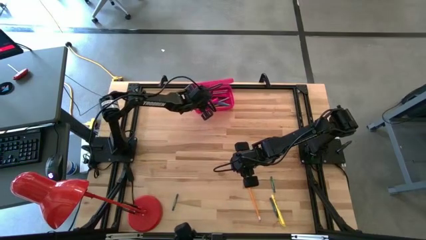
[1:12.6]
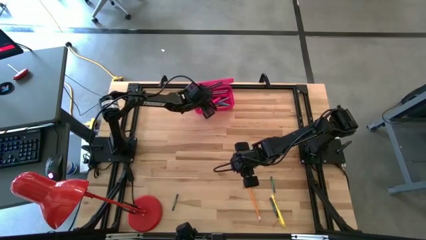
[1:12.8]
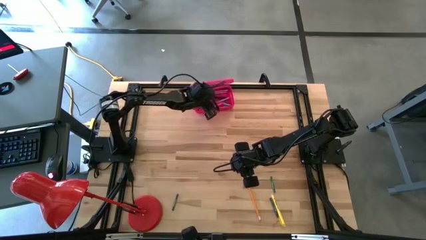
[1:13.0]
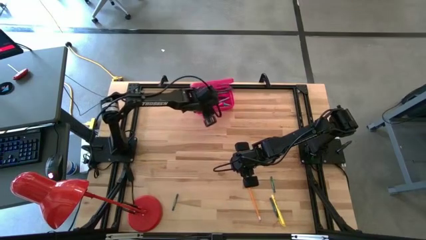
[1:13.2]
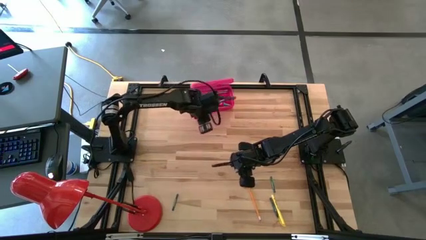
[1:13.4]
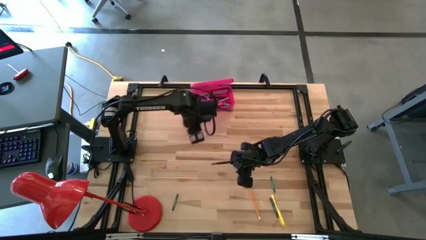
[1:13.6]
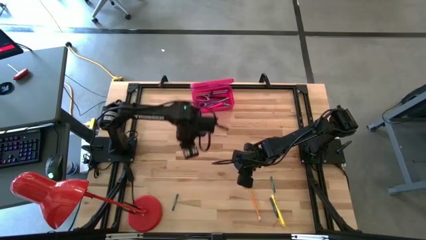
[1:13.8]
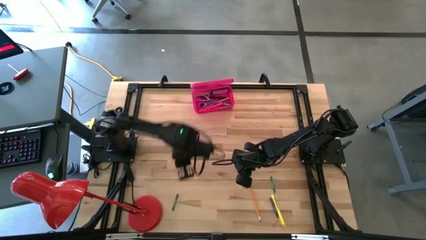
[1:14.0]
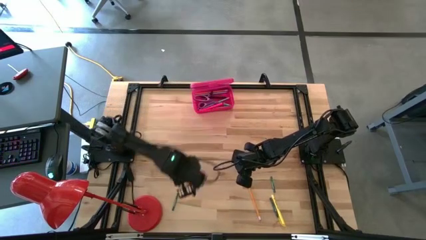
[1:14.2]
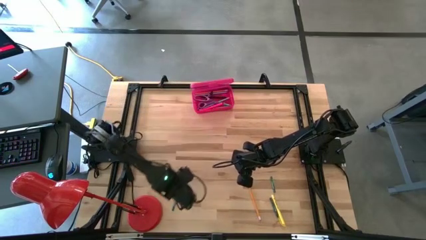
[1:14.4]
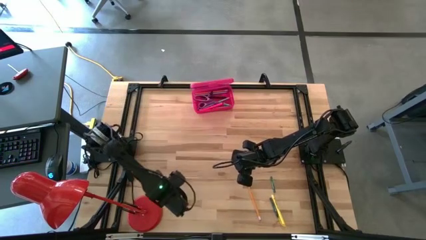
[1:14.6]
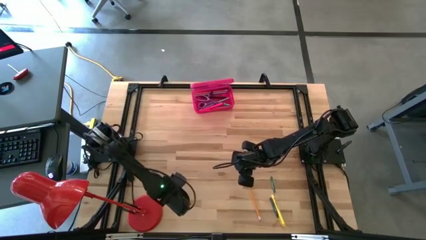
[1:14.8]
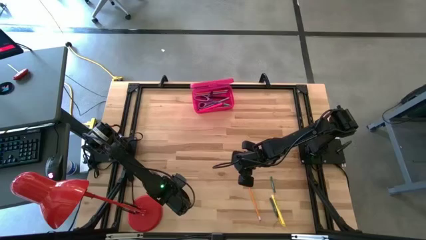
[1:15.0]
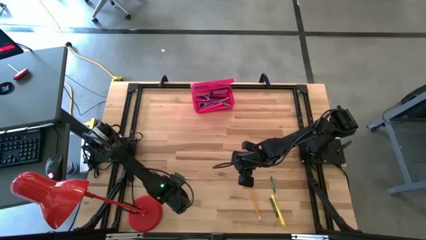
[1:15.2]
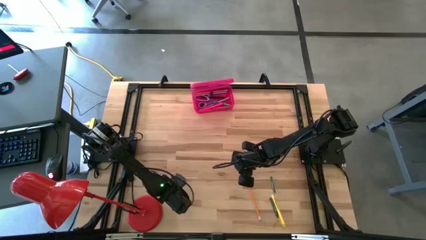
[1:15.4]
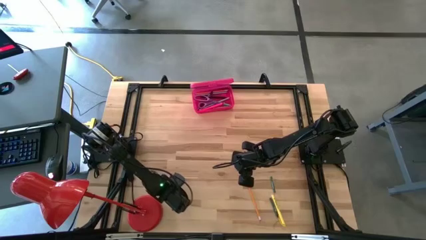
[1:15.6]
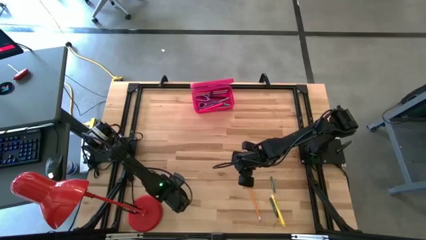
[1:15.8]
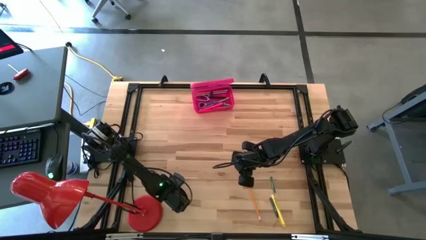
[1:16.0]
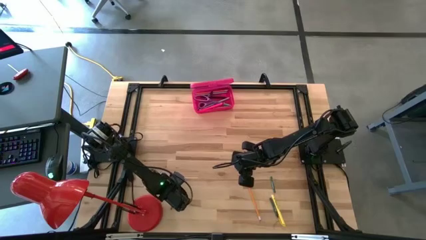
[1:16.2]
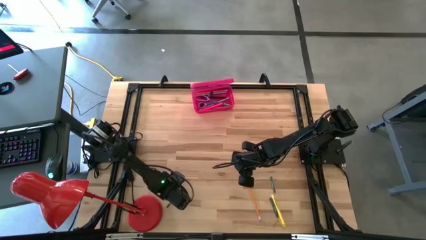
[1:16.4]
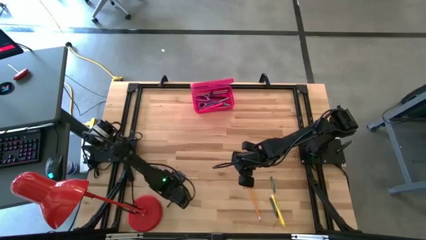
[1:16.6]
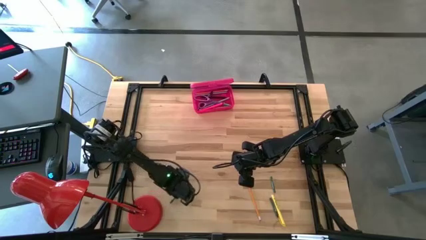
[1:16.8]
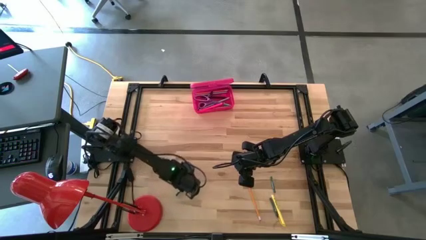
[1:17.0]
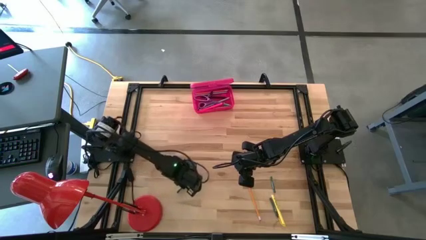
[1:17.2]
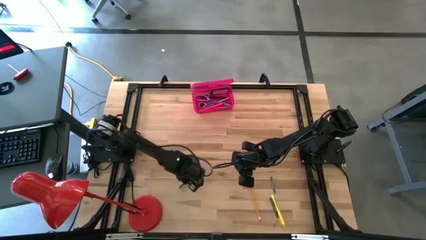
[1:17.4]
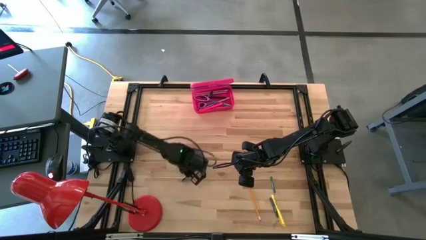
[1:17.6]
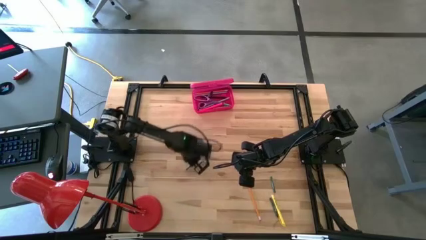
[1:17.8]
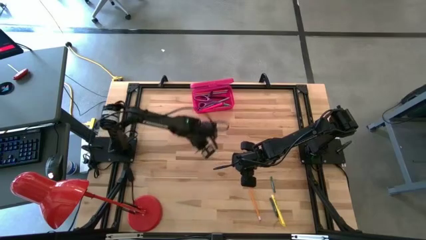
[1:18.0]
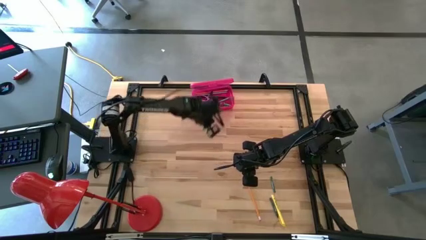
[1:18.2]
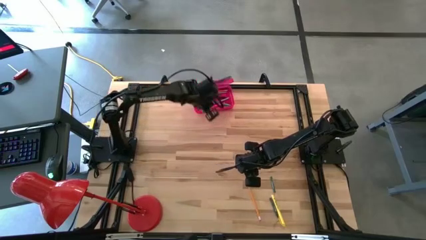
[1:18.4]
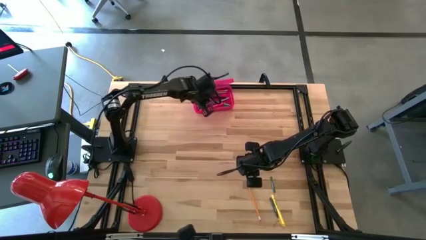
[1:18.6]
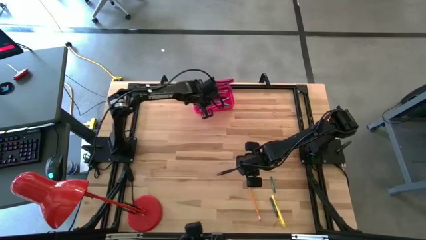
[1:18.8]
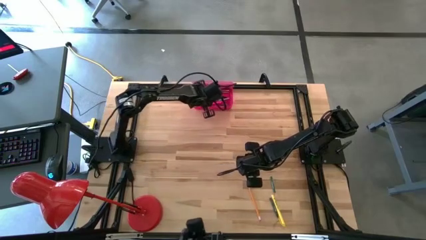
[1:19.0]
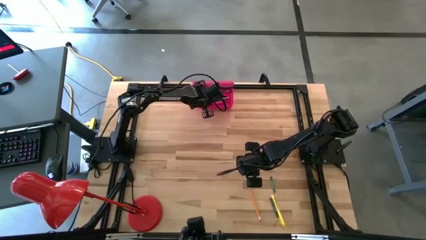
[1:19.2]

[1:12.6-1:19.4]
Task: Pick & place school supplies into a supply box
Put the bottom left green crayon into the pink supply box

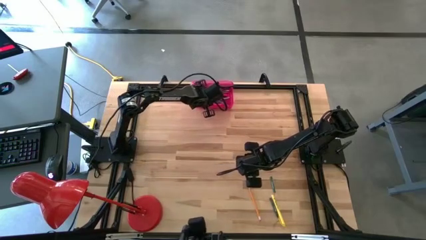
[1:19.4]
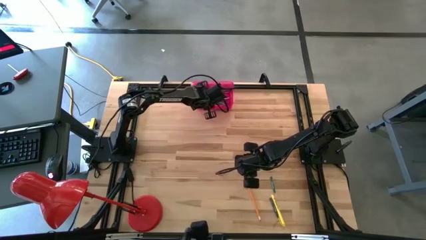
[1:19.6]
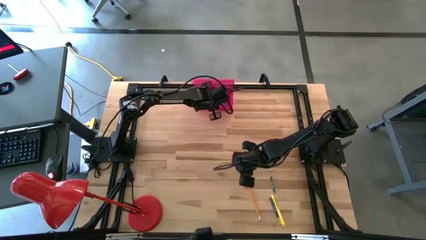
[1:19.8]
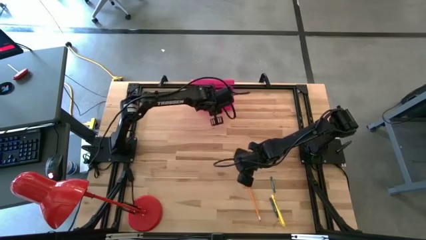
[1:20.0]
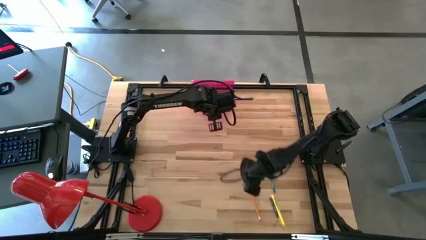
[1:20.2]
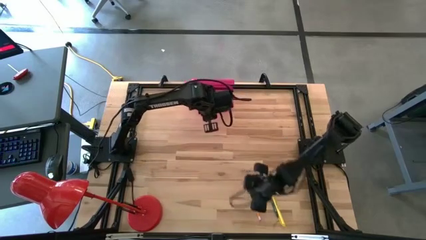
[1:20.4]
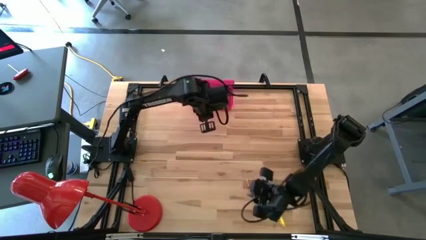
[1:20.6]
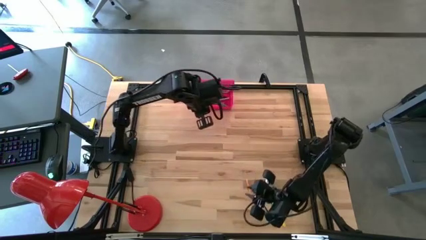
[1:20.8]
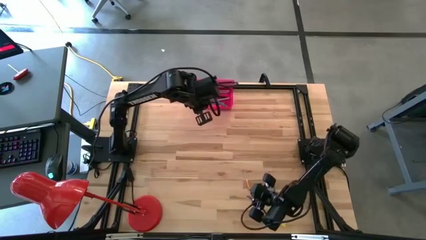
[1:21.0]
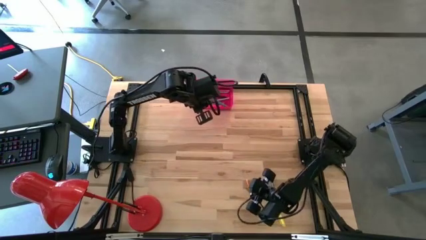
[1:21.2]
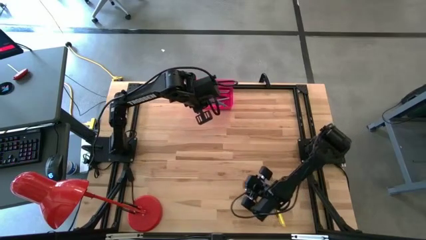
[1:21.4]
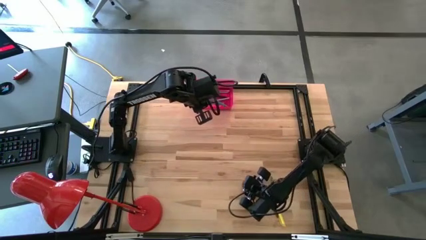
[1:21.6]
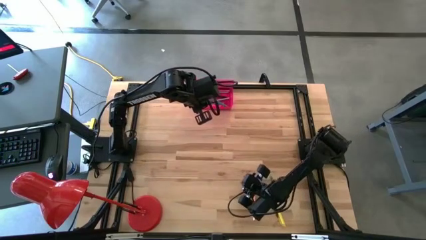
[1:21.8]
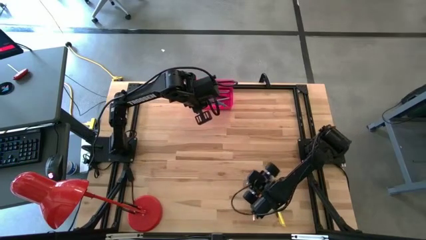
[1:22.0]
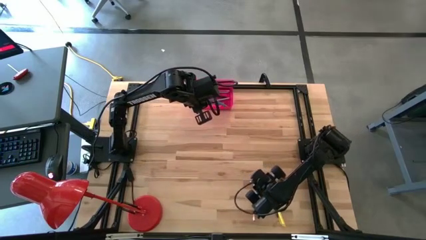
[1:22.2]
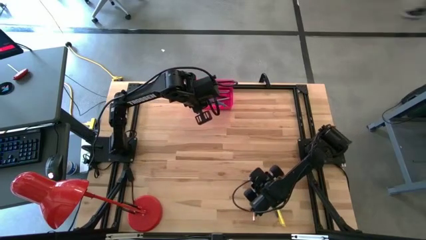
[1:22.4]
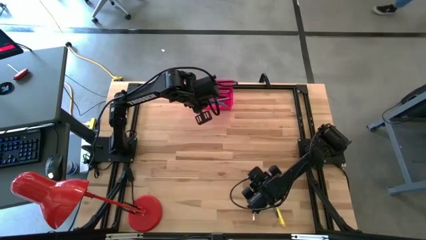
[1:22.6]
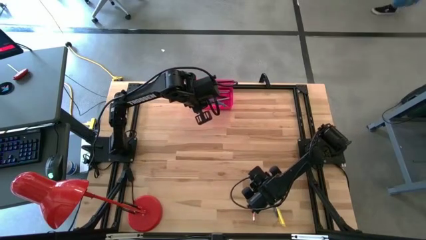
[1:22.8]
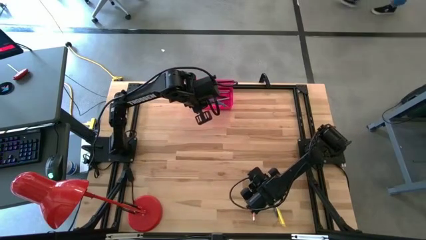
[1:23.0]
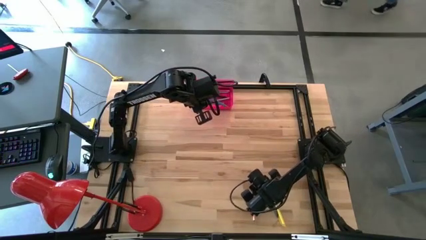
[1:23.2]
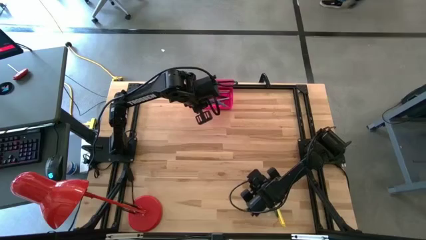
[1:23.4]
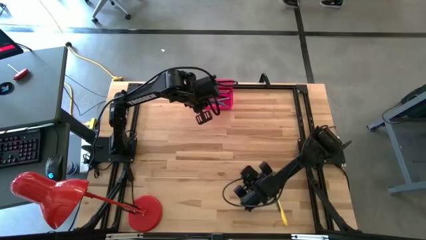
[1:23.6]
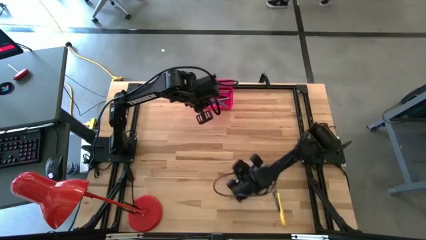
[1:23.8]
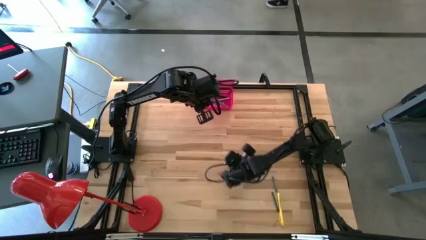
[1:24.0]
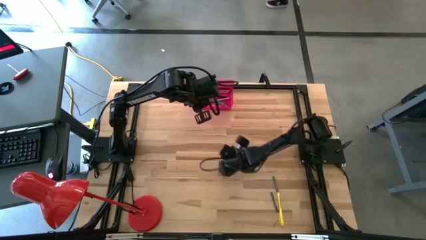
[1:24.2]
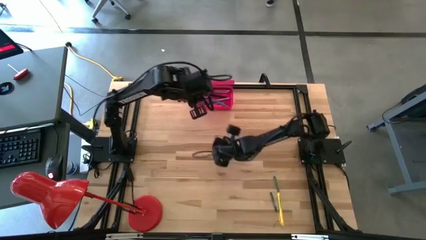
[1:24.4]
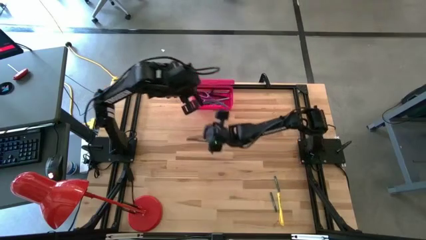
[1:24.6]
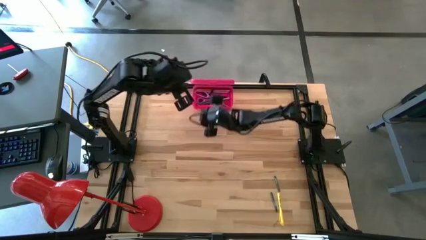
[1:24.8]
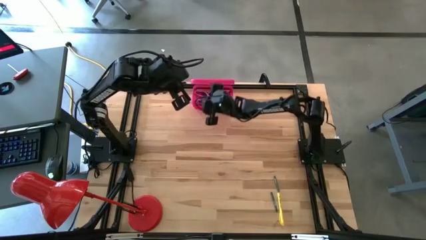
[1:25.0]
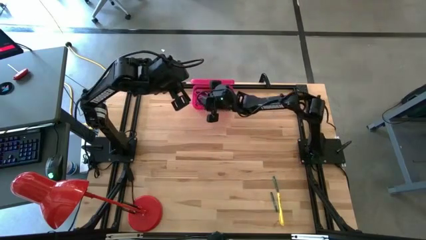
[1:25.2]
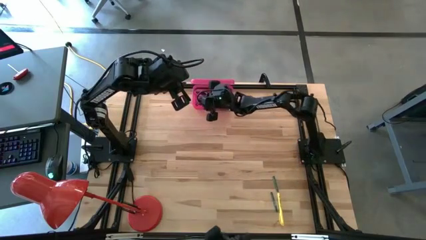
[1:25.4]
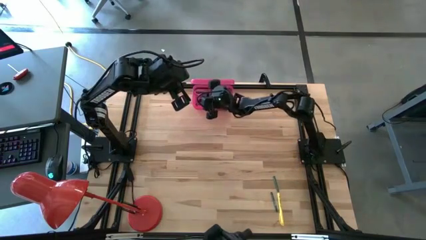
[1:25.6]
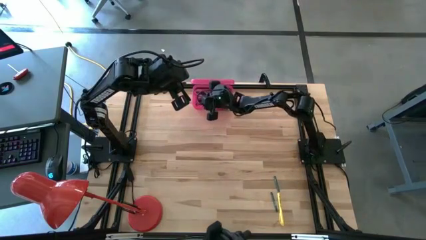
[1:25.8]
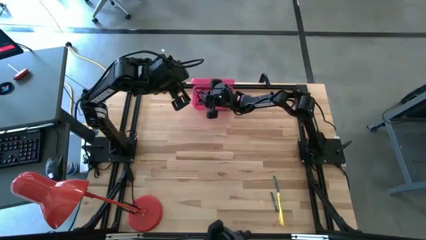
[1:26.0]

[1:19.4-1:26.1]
Put the yellow pencil into the pink supply box

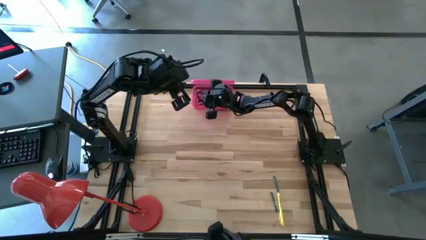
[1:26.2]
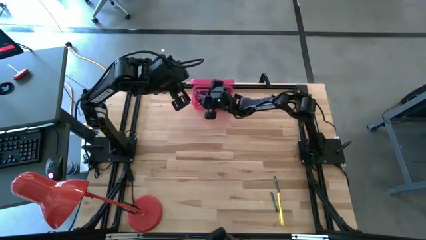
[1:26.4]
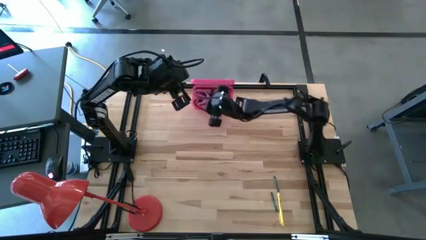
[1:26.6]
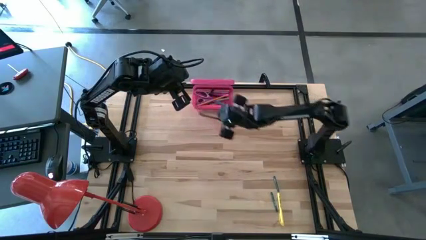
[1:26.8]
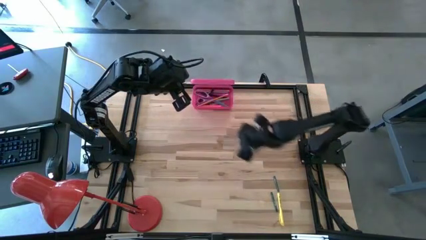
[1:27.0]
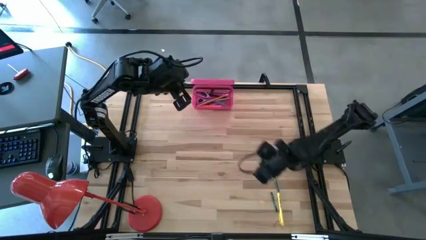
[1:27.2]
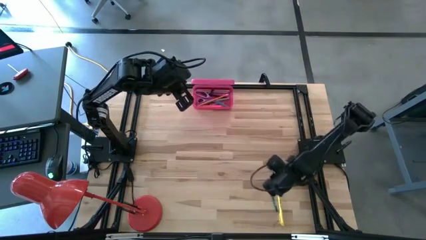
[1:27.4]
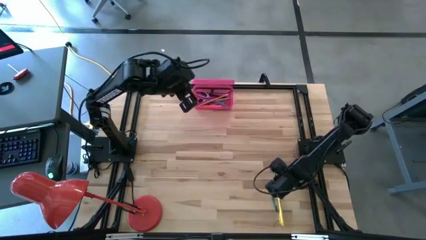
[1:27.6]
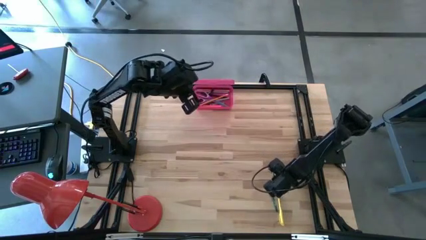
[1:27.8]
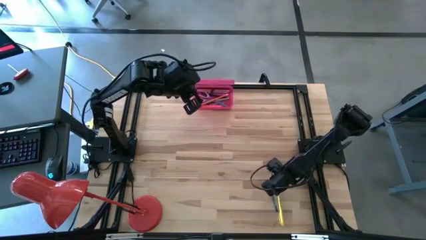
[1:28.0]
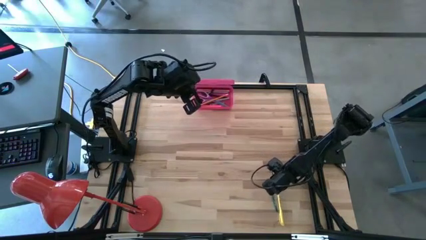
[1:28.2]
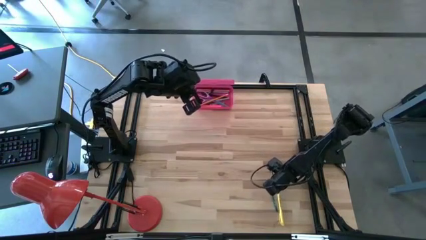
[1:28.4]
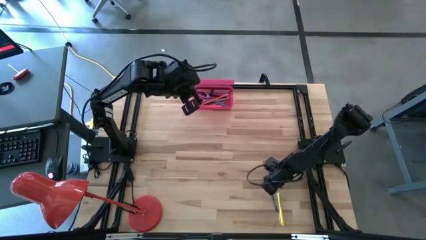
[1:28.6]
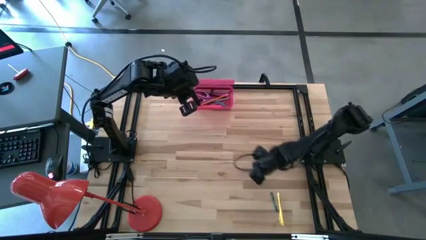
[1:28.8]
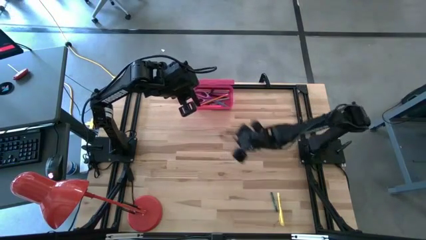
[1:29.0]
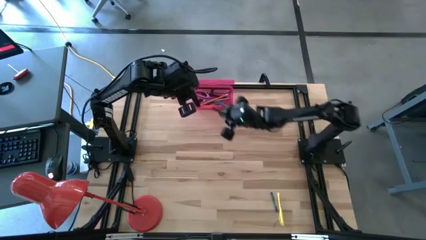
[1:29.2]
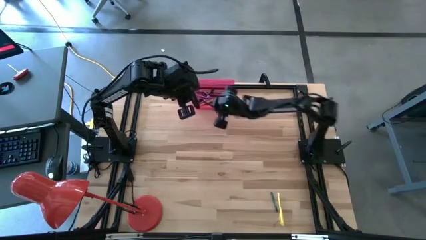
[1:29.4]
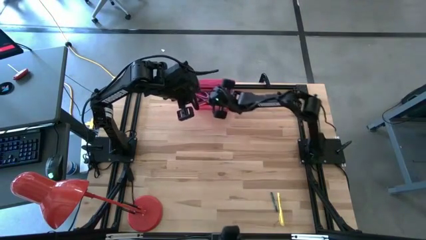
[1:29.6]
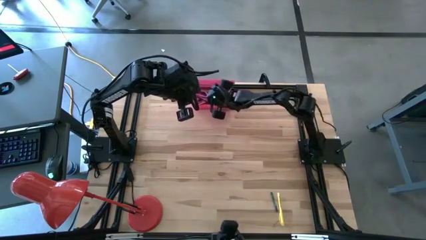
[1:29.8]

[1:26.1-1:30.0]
Put the top green crayon into the pink supply box
